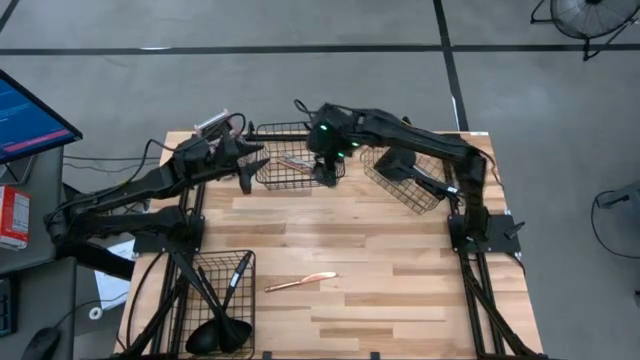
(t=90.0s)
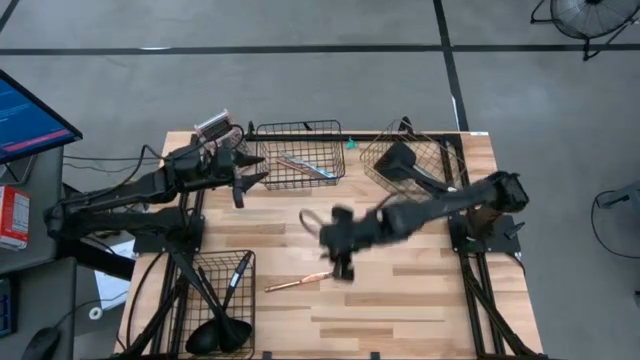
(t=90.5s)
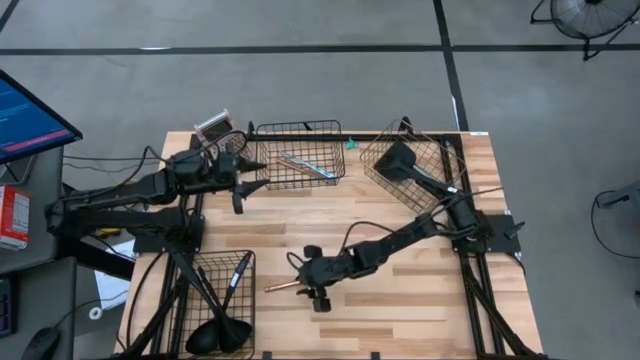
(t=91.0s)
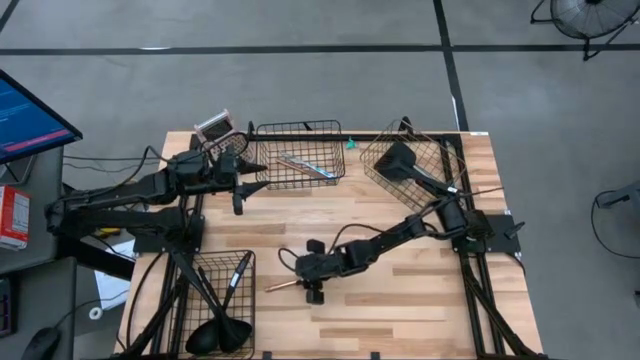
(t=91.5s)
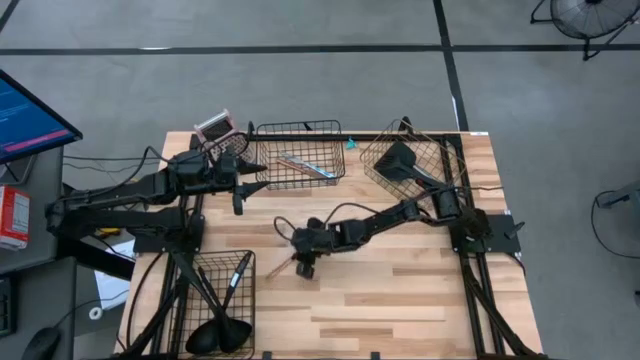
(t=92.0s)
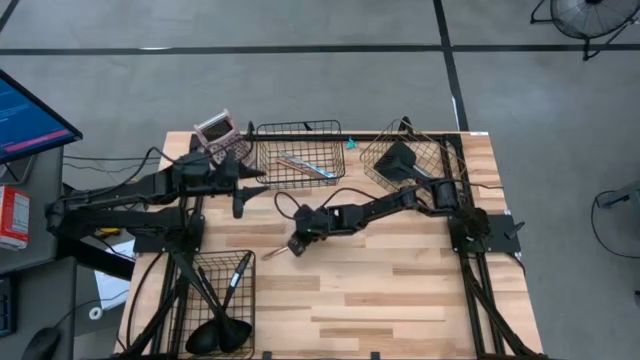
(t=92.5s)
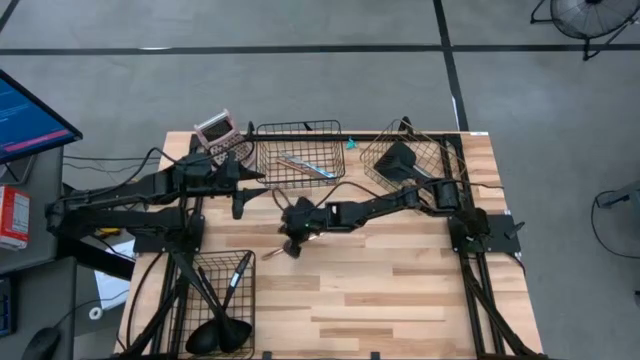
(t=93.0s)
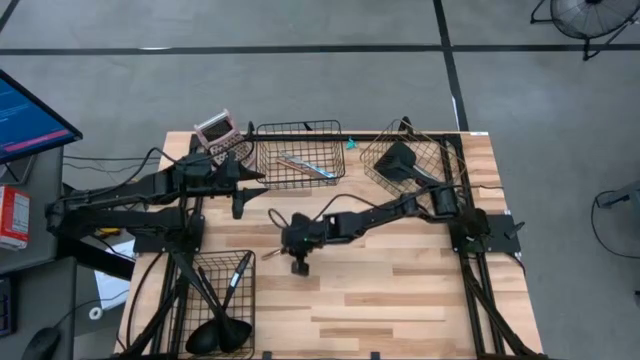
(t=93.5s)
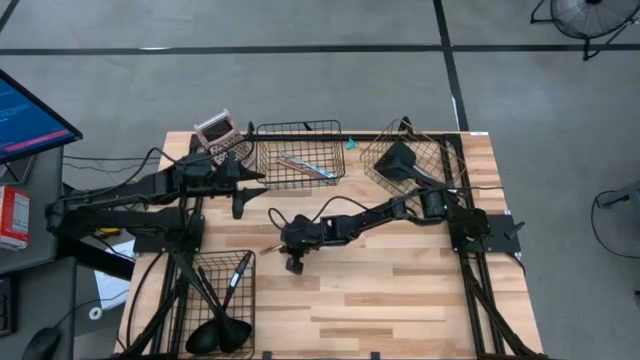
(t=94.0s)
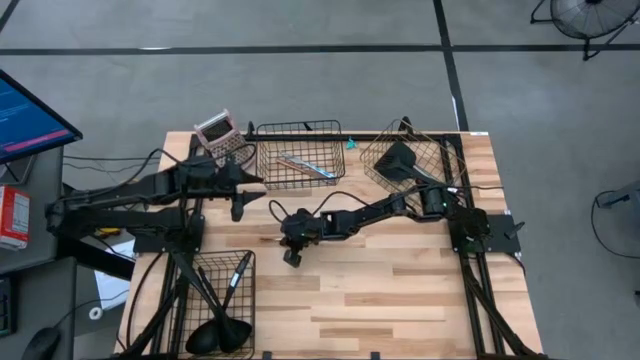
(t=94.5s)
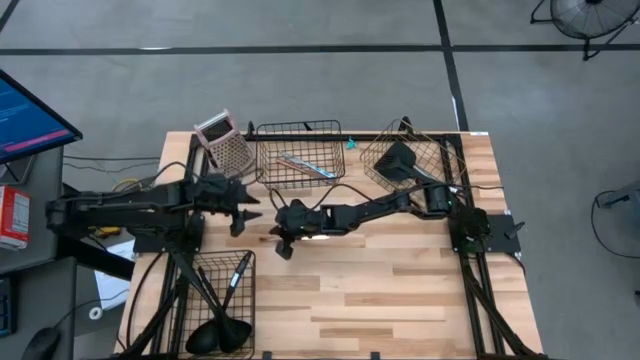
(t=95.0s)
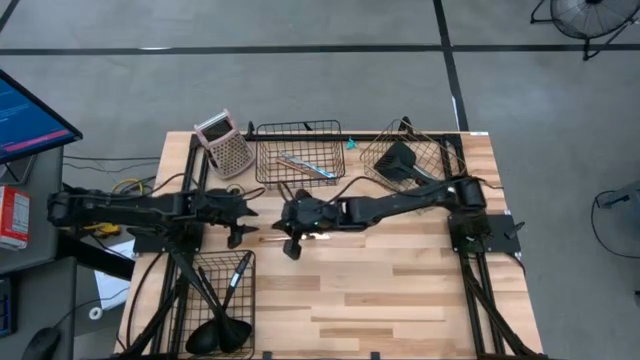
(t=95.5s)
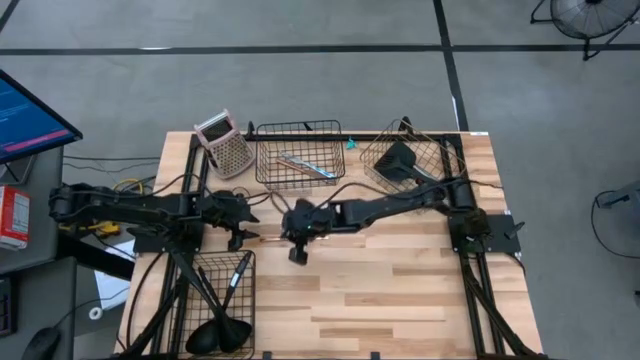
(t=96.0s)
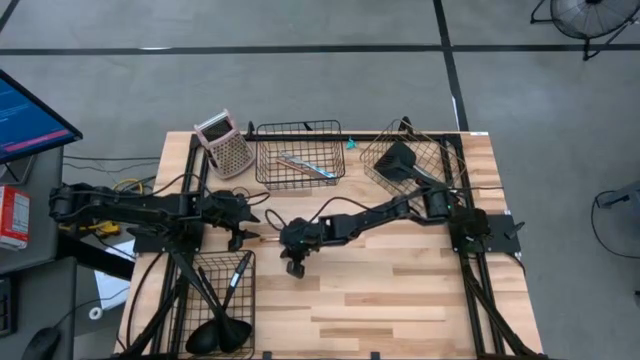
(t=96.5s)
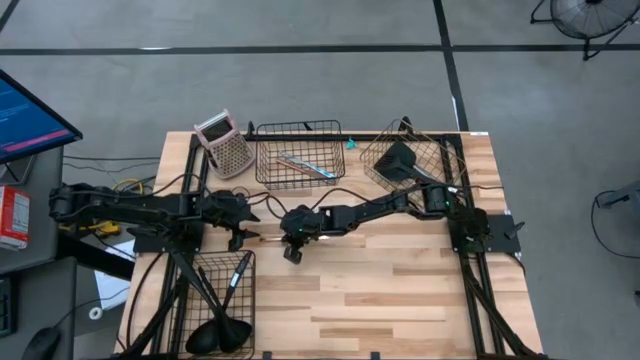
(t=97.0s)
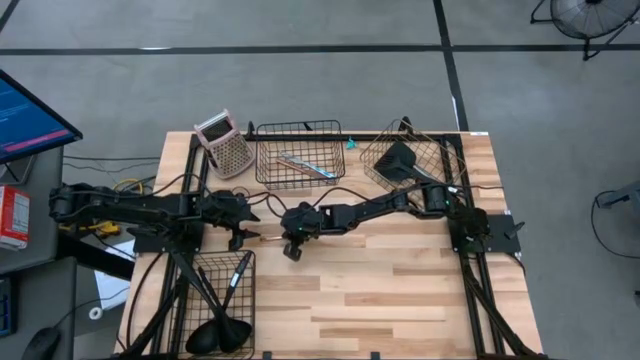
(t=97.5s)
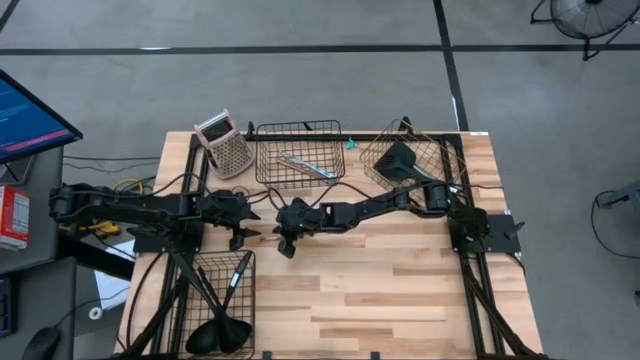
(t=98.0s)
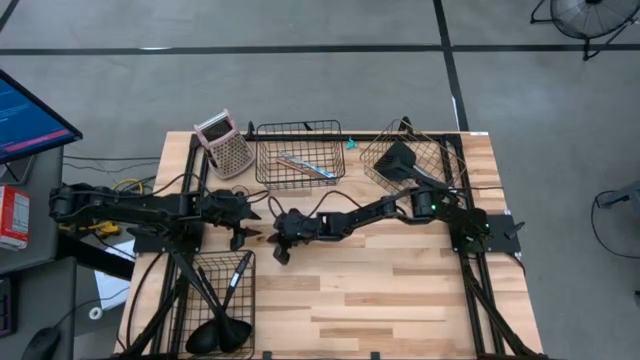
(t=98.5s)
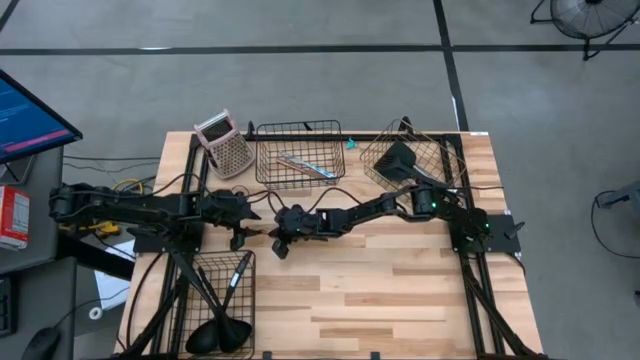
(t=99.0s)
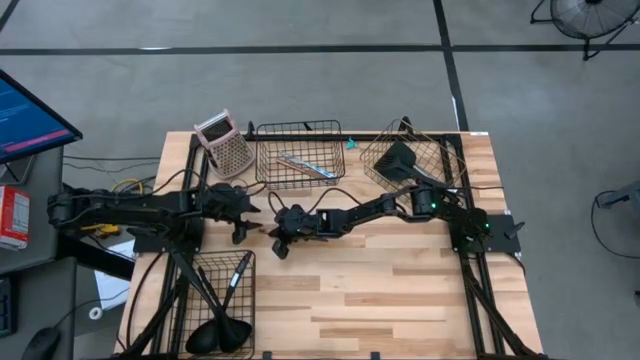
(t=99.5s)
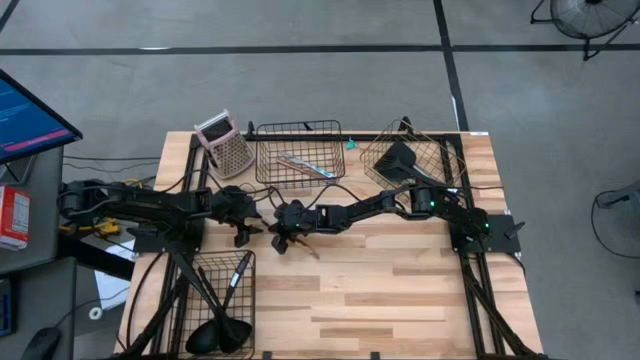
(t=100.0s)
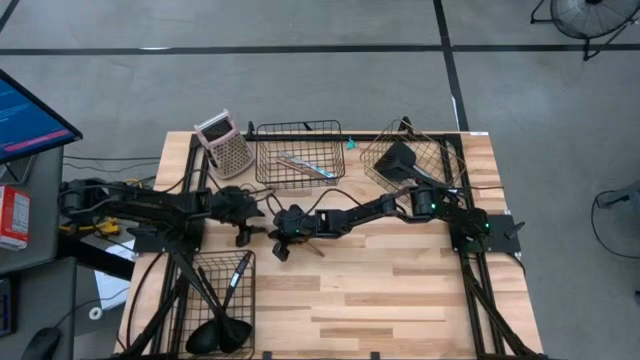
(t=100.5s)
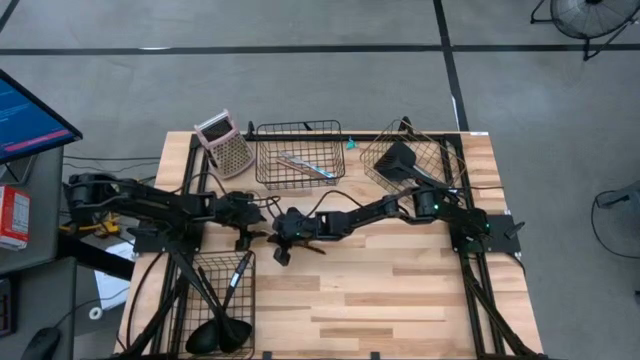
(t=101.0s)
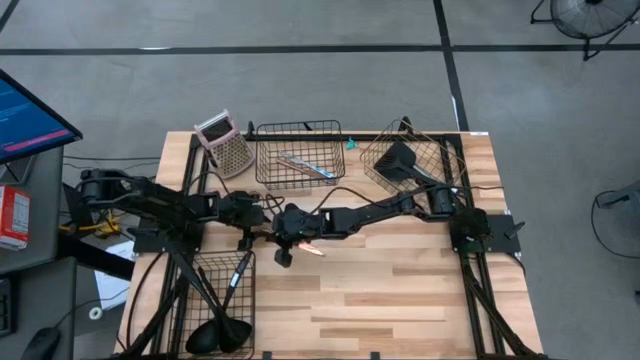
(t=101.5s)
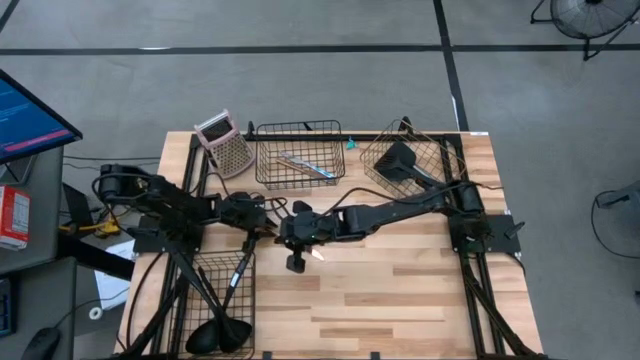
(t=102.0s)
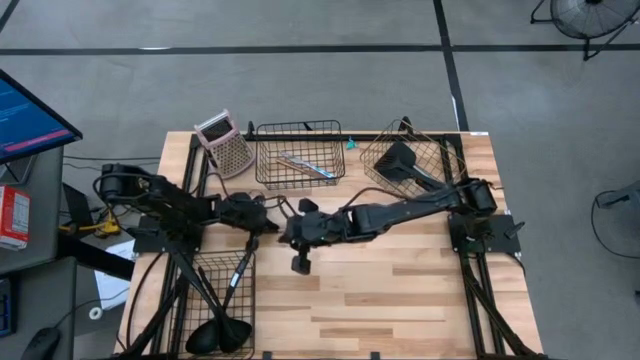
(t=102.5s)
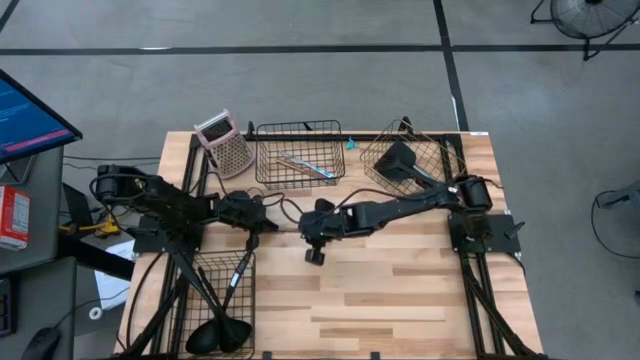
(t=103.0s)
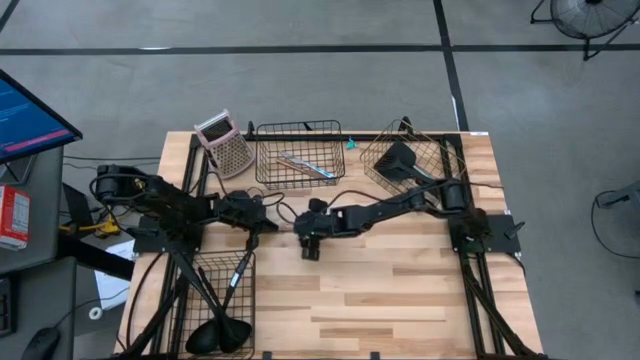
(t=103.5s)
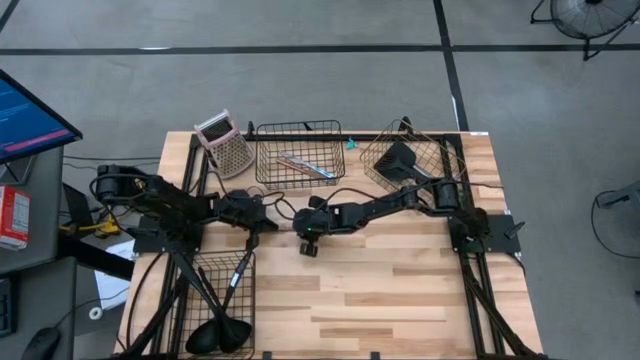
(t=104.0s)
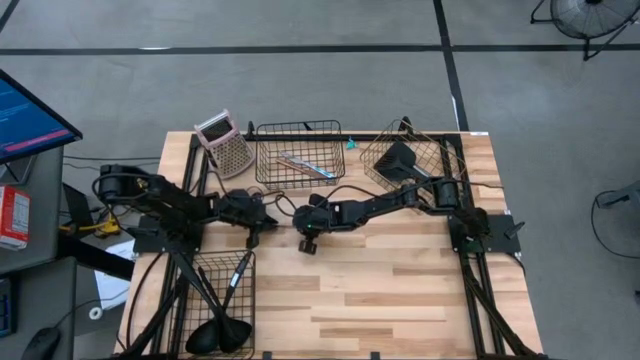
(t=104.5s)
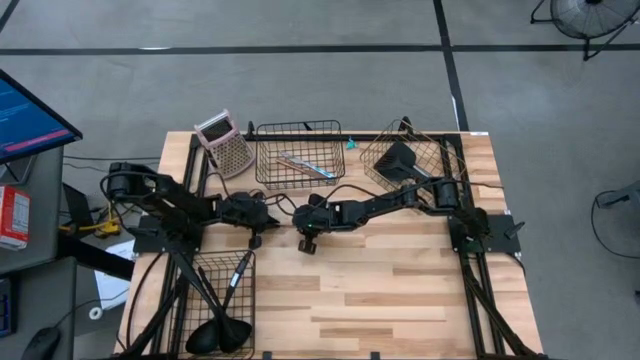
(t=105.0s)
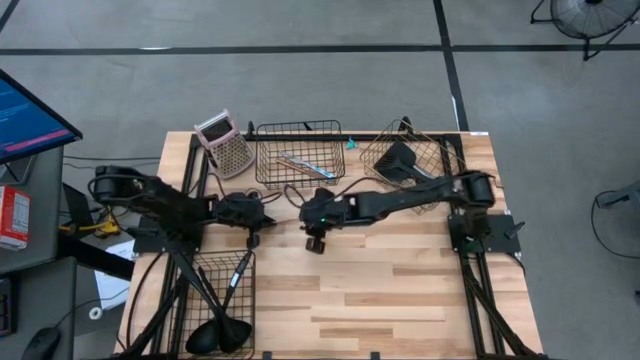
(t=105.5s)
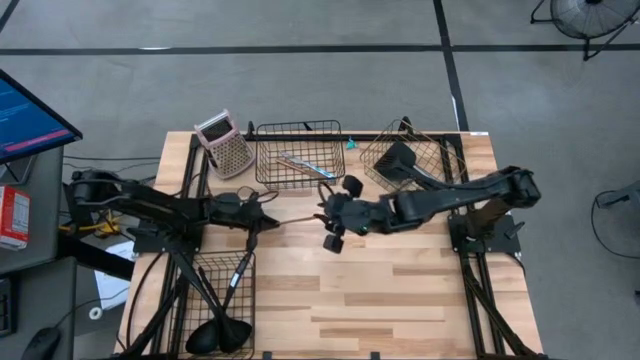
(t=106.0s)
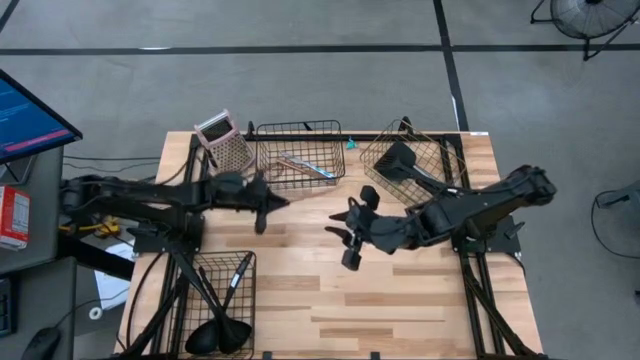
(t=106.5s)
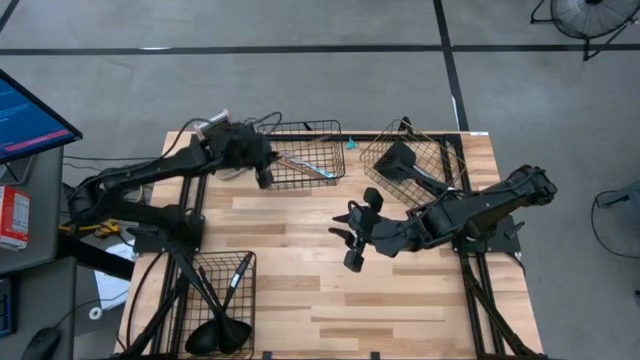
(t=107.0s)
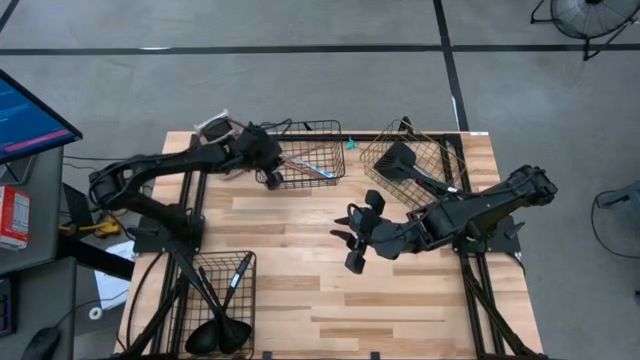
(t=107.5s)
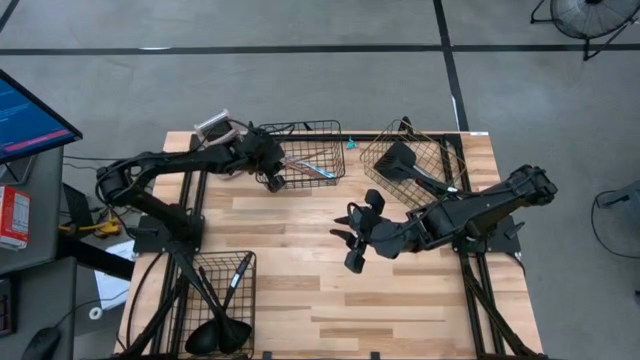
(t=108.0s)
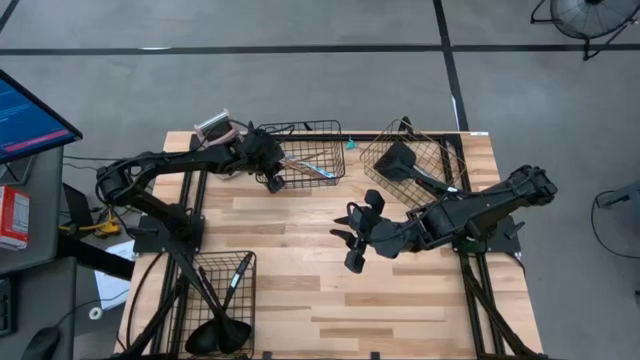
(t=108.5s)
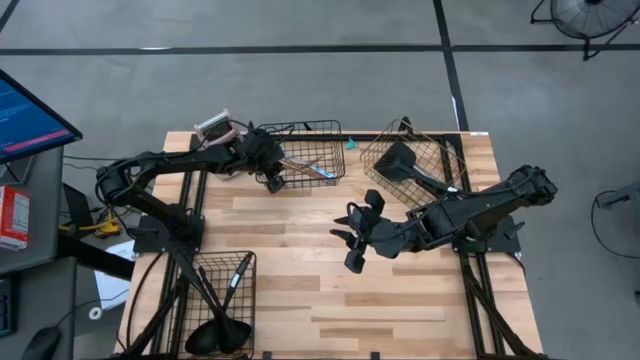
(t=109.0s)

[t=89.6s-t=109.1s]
Task: Pick & Place Kitchen Items
Put the brown knife into the top black wire basket

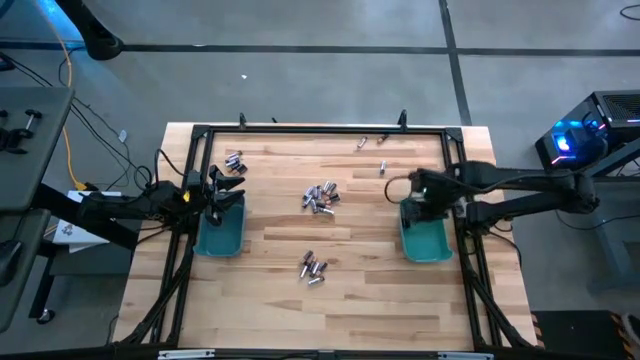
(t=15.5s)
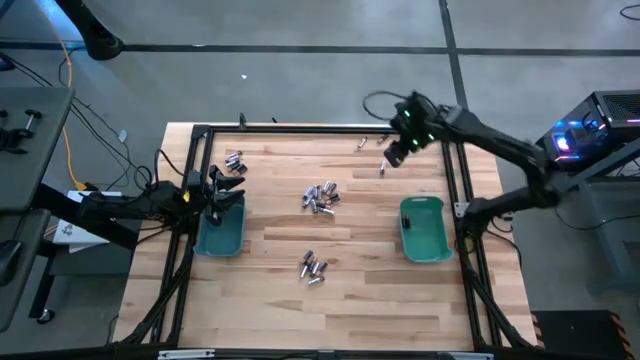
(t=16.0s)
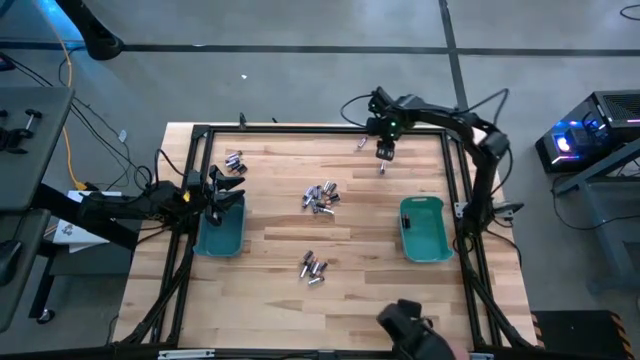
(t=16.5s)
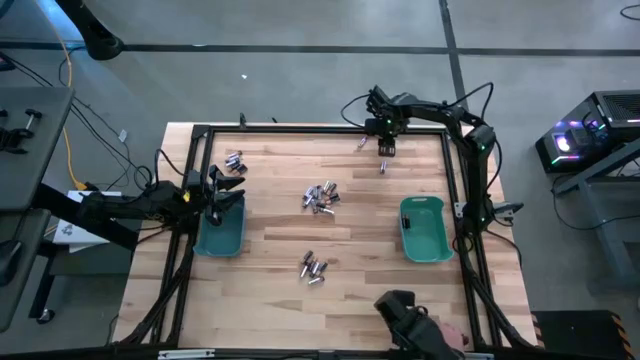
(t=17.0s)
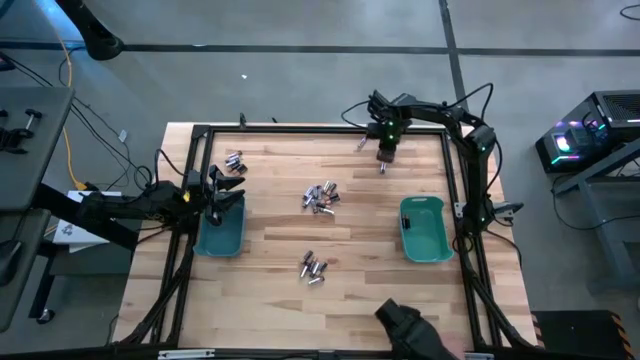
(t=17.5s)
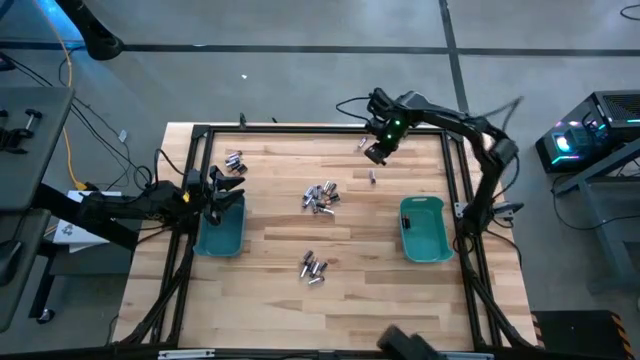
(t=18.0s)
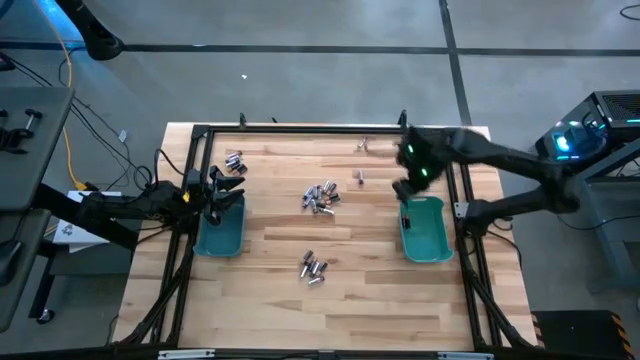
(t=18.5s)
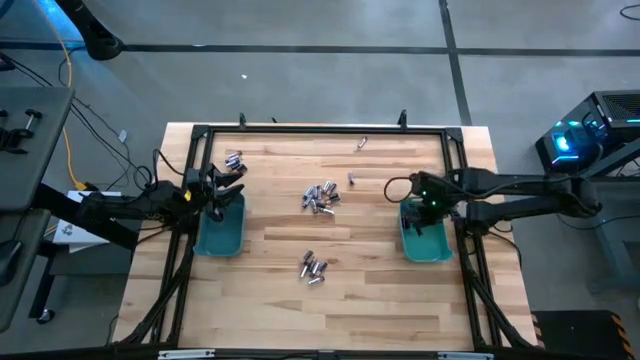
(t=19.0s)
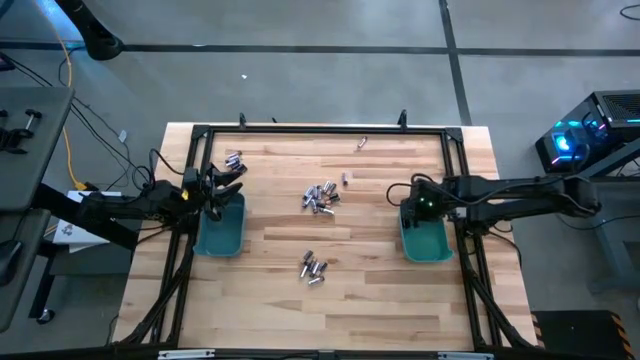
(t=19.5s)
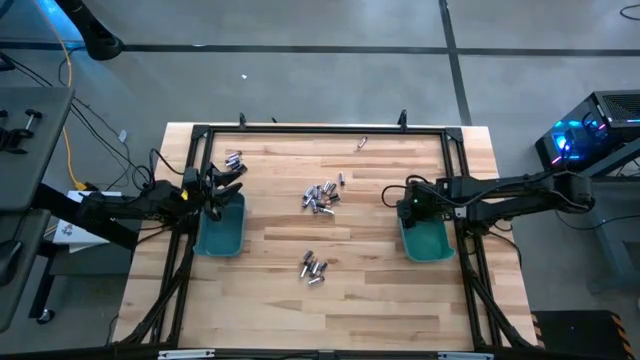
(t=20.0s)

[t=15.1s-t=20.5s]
Task: Sort batteries
Put the black battery into the green bin
